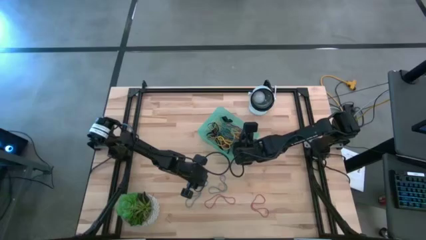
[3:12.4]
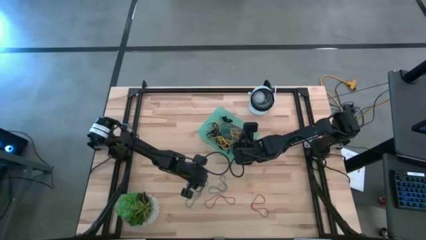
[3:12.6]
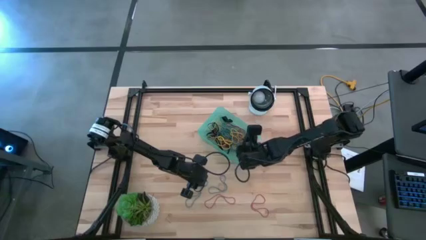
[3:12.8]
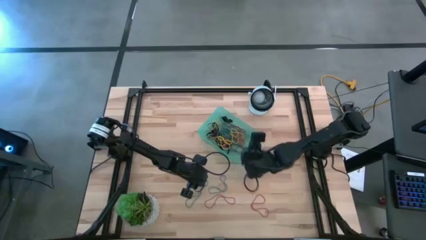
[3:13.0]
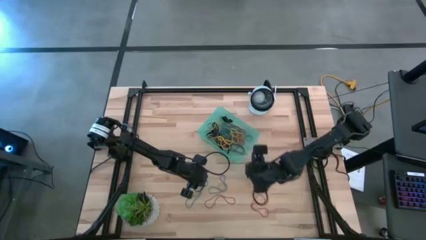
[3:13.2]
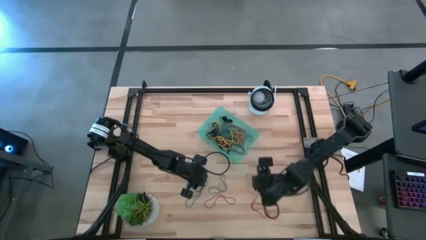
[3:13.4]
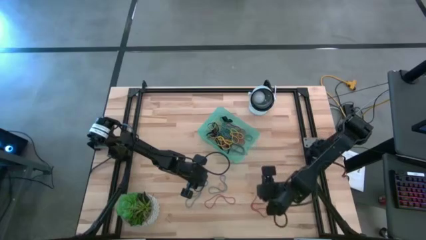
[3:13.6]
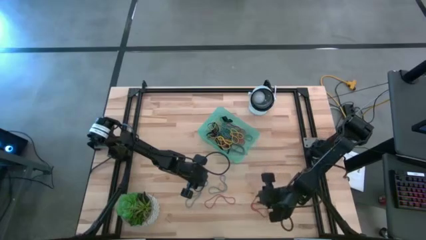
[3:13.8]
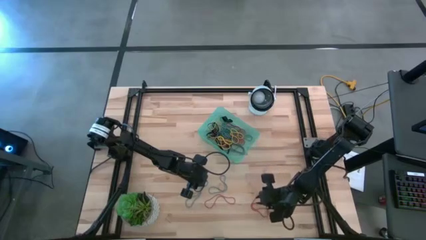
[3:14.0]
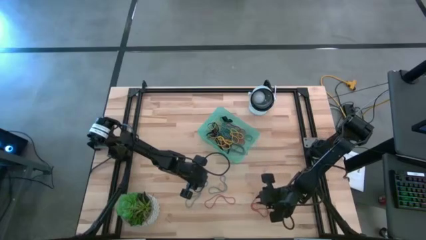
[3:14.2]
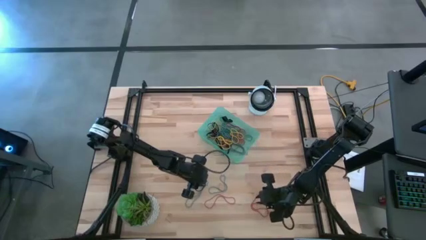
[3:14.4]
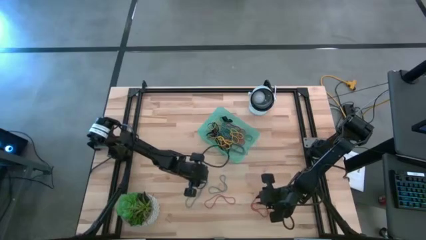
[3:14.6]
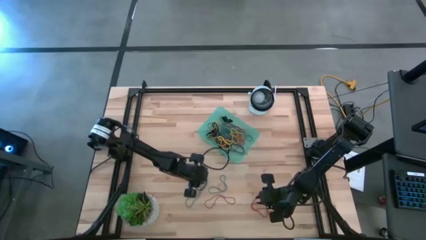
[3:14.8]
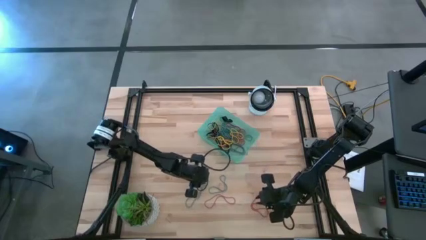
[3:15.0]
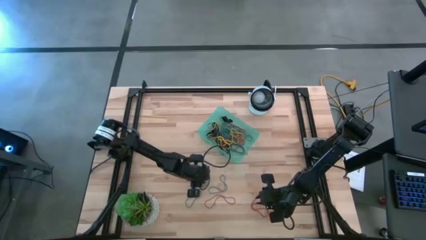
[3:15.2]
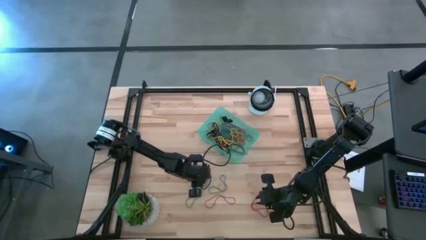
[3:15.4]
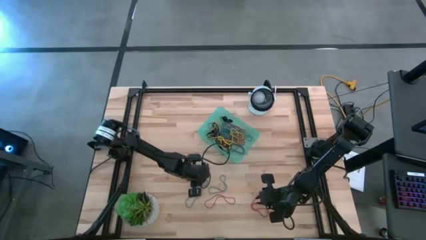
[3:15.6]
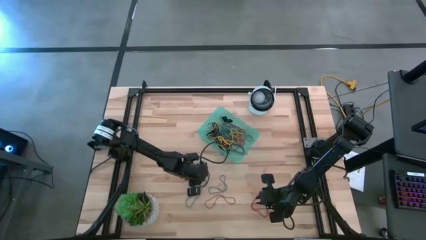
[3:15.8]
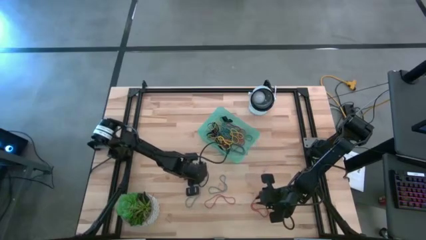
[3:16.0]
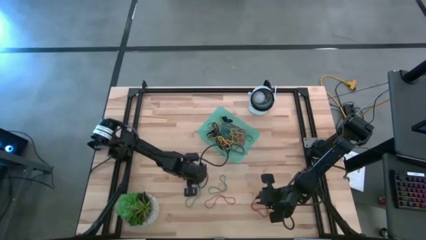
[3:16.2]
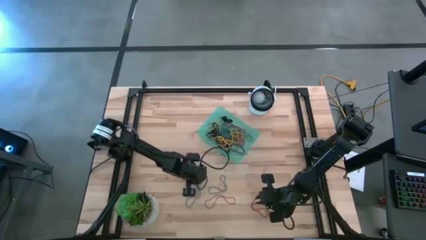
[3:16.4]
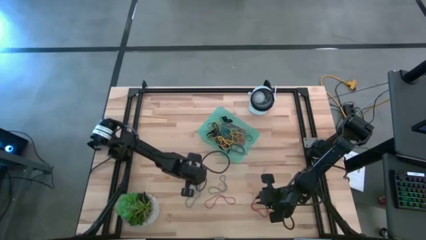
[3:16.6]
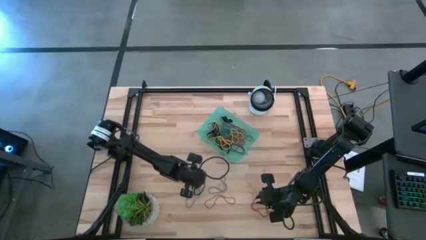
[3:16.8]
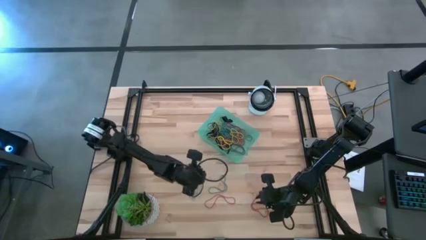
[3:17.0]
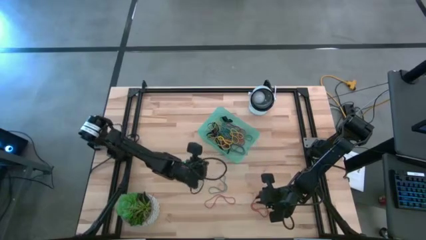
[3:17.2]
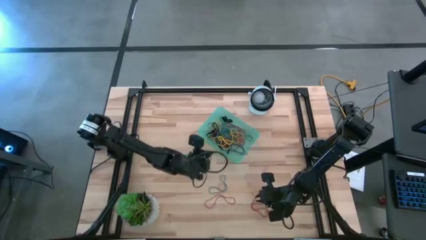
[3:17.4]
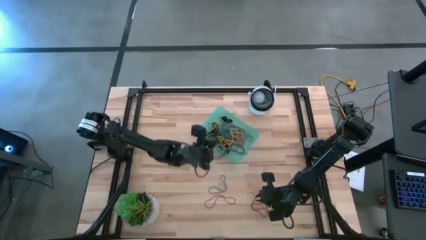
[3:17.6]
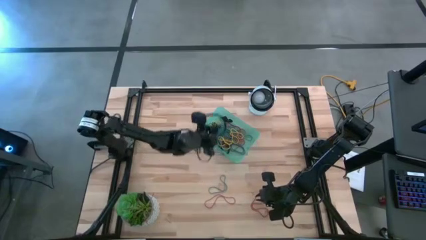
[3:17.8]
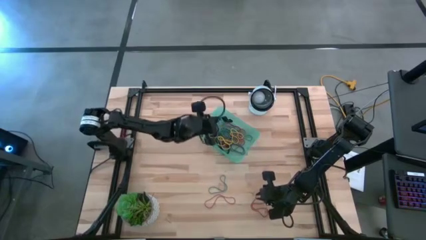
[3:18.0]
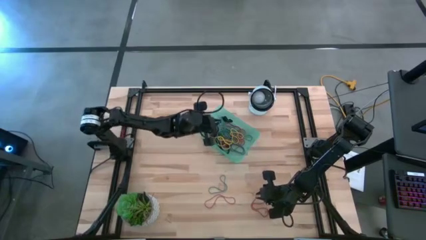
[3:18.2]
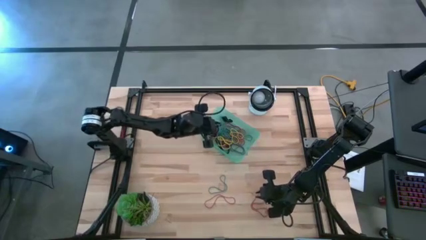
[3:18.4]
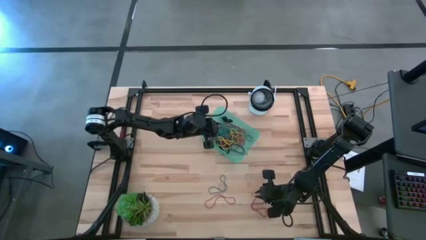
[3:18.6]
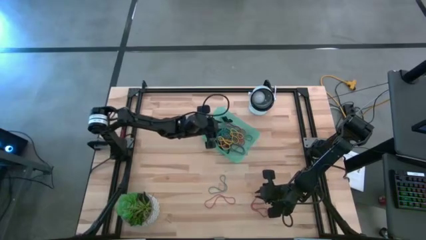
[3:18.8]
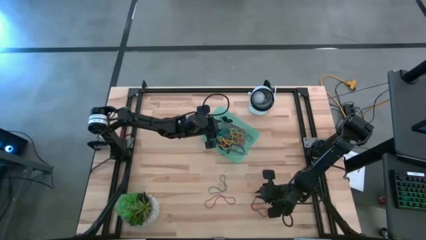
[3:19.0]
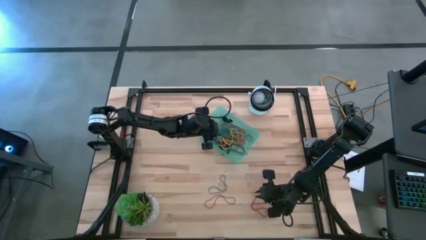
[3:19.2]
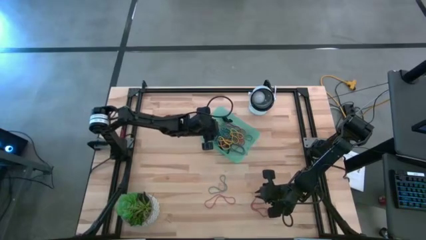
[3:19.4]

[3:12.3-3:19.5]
Task: Pick and place rubber bands into bin
Put the blue rubber band into the blue bin

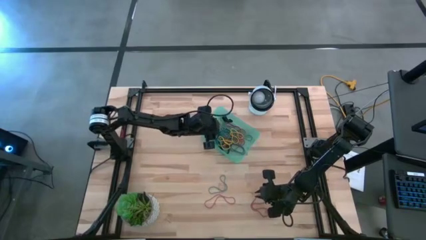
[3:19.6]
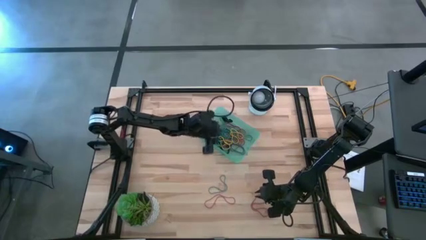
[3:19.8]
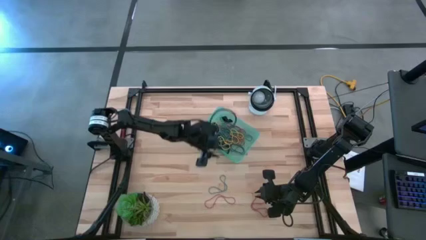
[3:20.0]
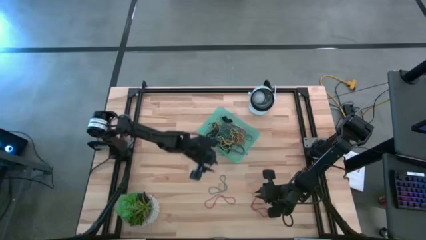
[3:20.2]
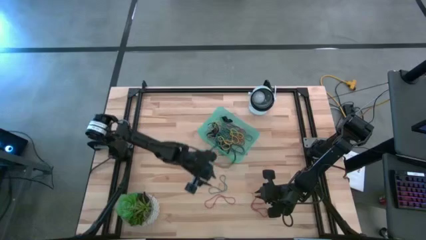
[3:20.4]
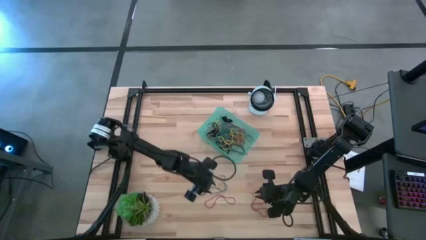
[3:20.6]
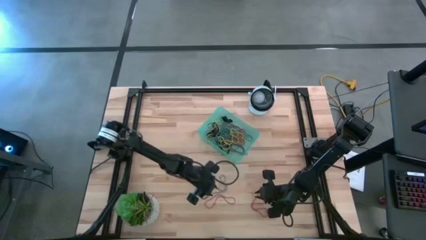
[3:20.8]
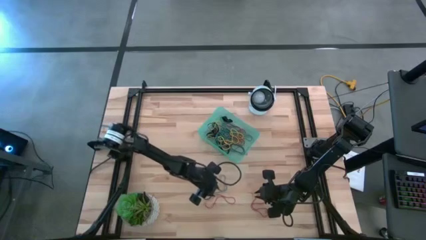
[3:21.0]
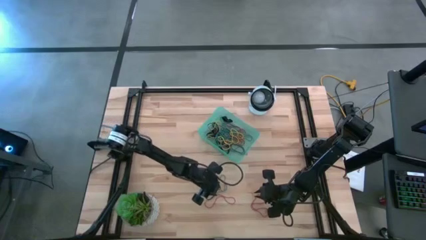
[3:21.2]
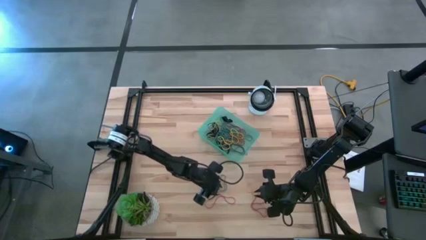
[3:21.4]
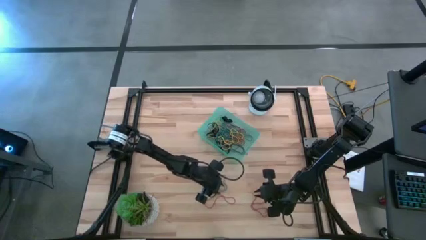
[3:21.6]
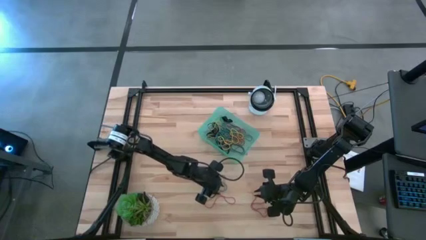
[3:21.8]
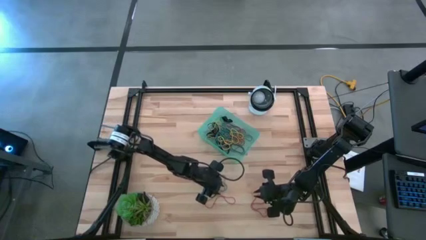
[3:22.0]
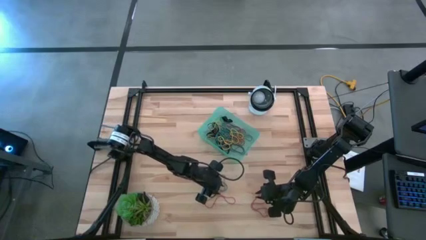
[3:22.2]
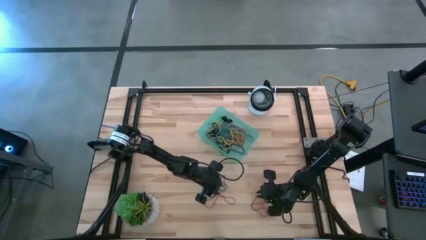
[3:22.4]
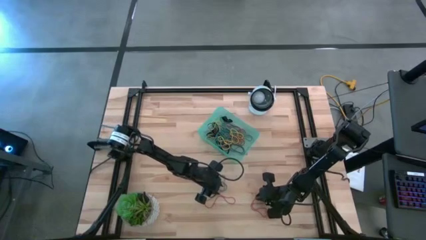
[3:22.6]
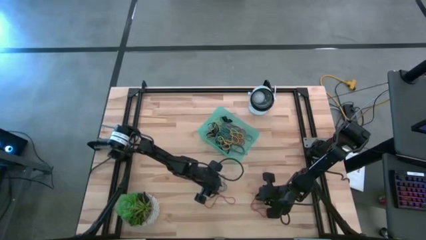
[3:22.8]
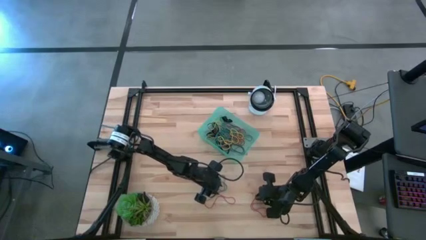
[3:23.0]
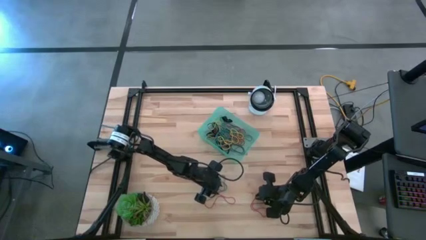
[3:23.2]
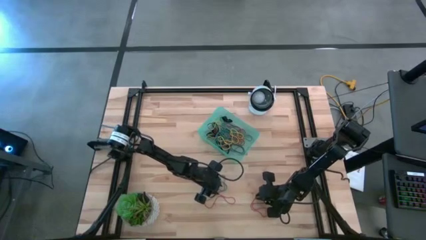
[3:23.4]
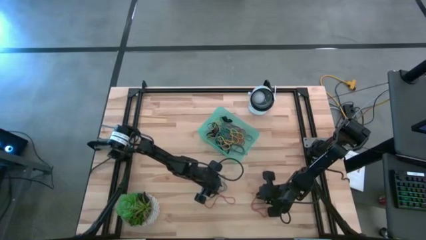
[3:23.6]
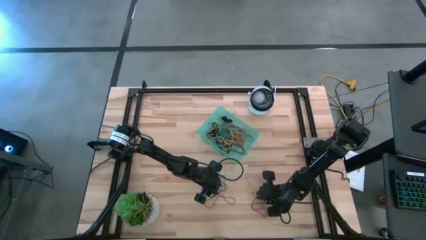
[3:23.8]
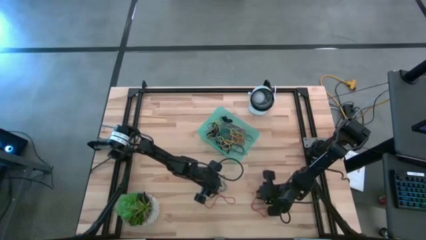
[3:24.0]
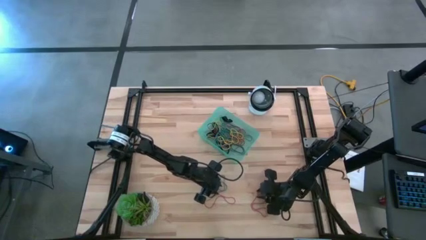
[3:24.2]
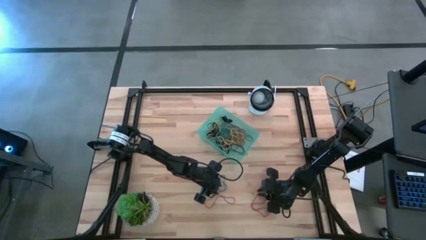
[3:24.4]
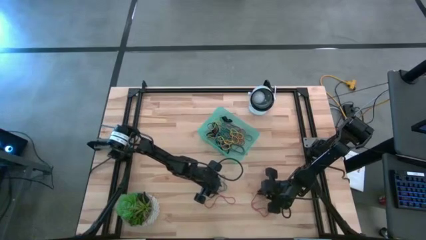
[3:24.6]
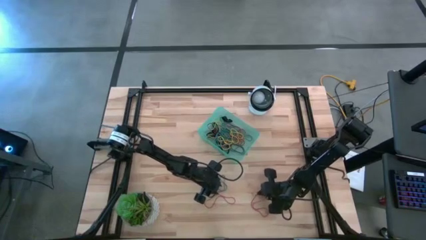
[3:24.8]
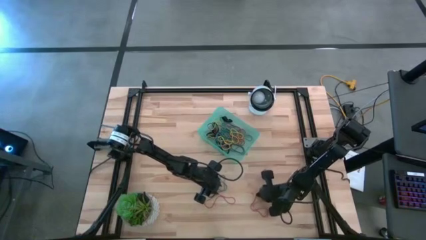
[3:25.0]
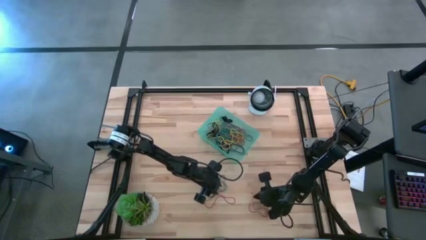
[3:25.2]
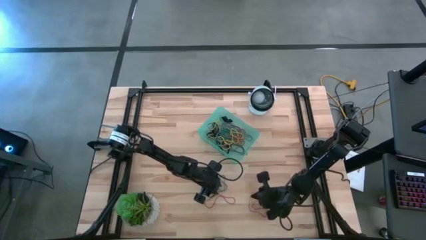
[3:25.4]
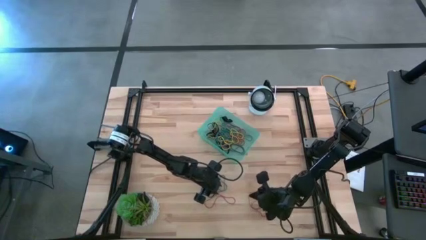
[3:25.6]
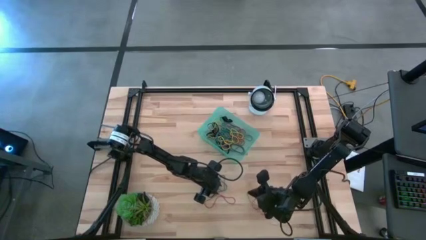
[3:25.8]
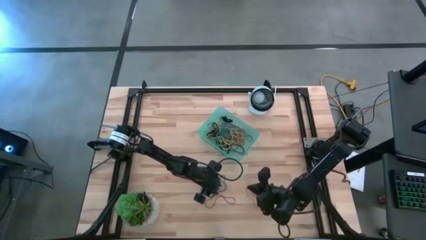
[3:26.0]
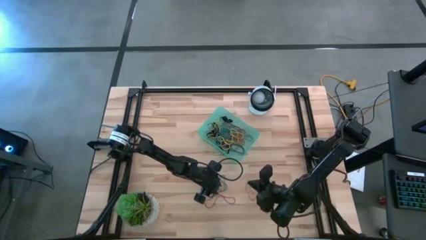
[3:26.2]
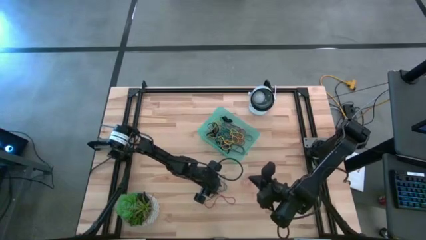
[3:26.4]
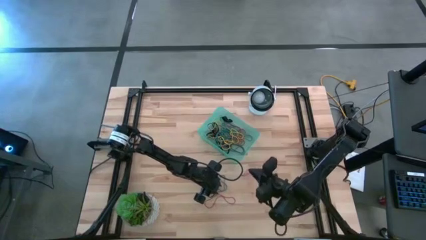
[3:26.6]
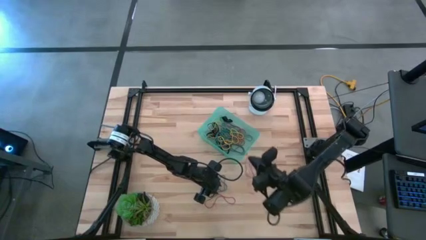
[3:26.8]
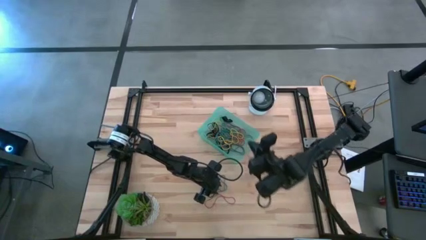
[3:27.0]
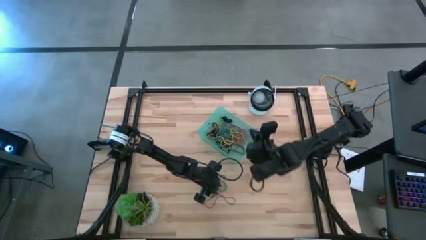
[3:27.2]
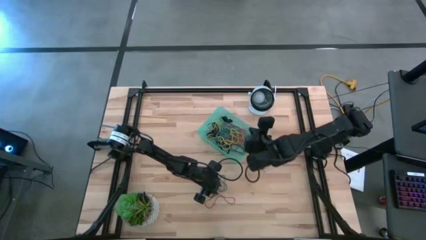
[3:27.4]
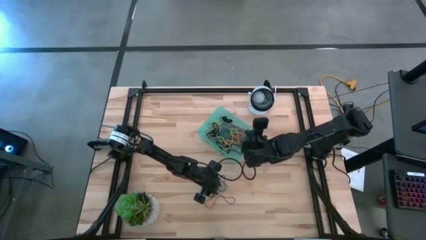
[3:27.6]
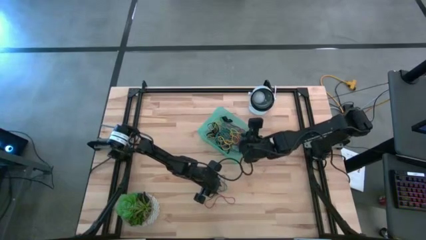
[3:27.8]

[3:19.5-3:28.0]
Put the red rubber band into the blue bin

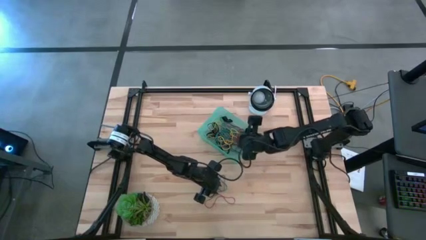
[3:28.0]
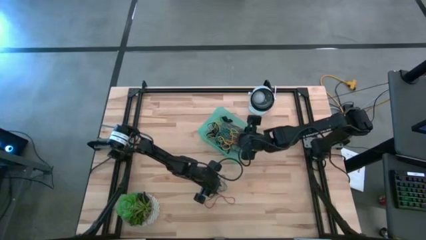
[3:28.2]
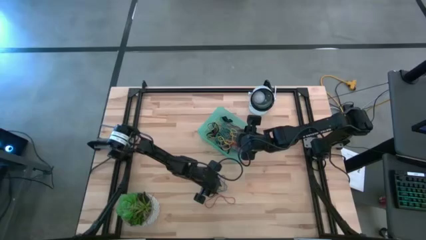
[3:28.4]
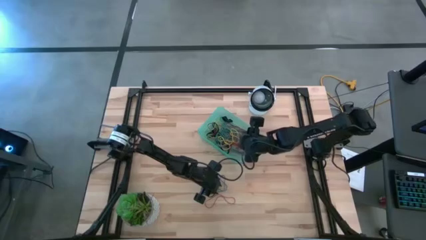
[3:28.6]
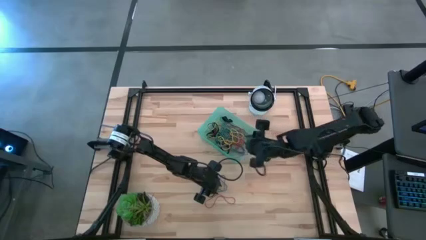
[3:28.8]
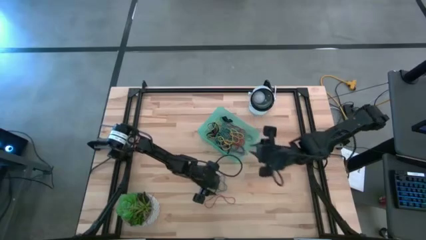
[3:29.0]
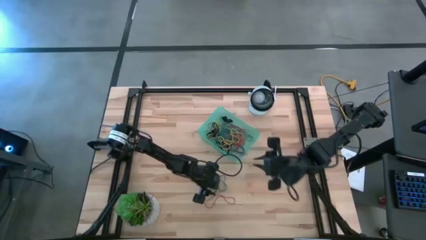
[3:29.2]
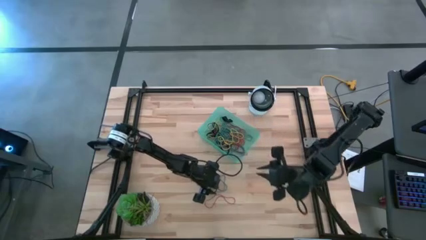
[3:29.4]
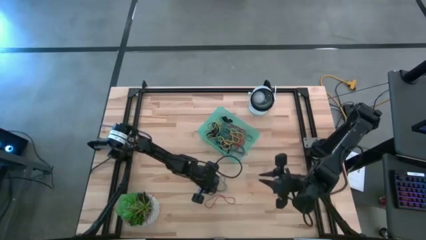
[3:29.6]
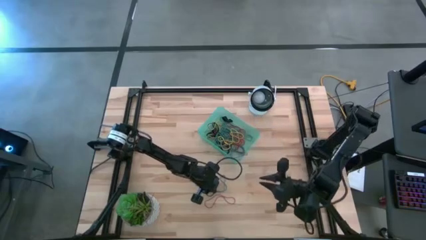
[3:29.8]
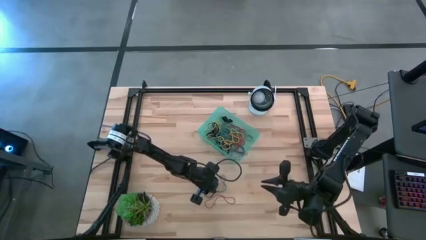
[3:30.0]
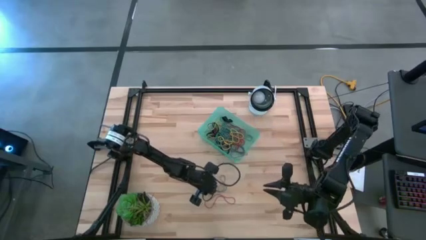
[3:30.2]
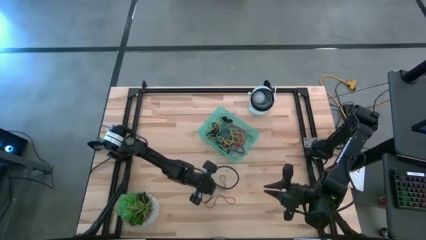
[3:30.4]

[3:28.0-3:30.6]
Put the blue rubber band into the blue bin
